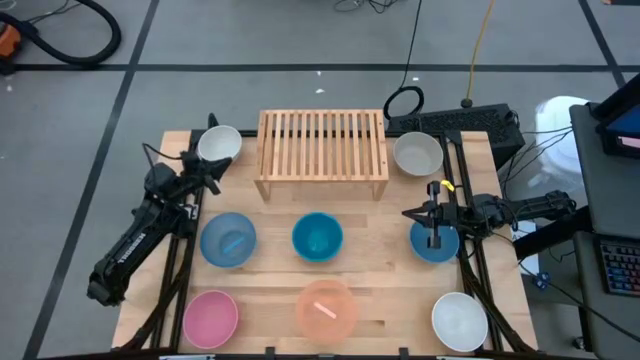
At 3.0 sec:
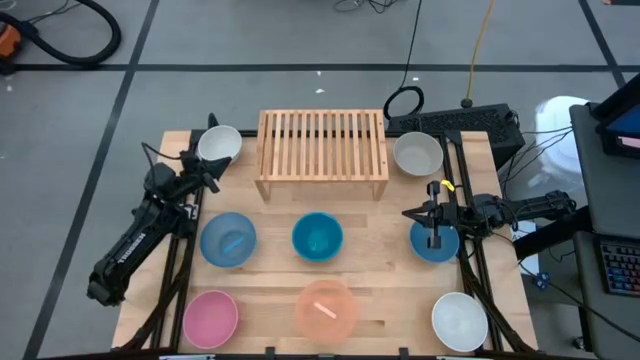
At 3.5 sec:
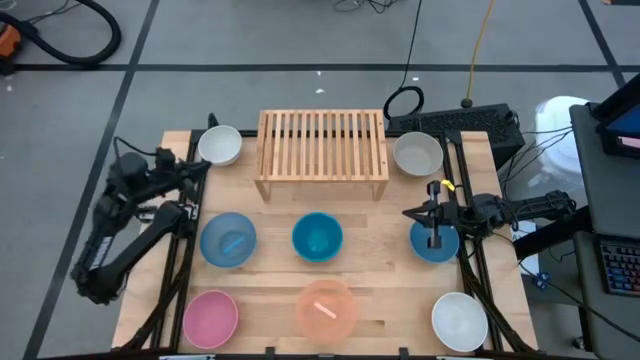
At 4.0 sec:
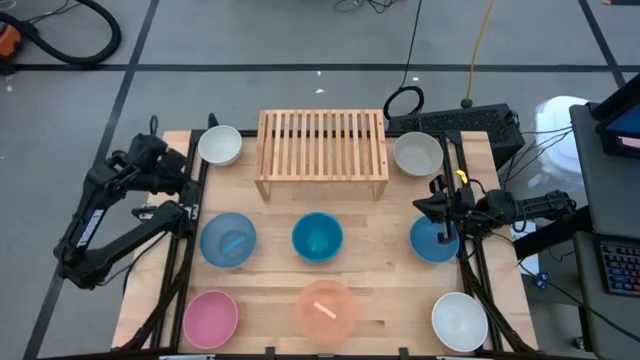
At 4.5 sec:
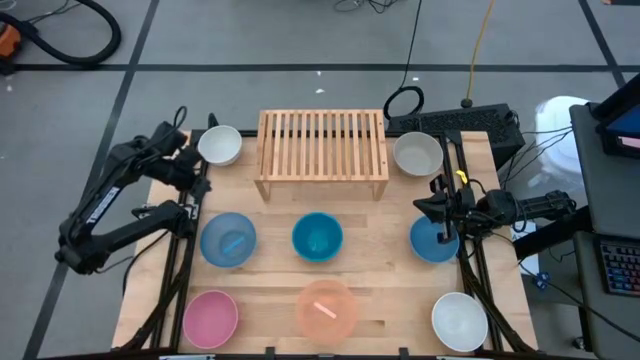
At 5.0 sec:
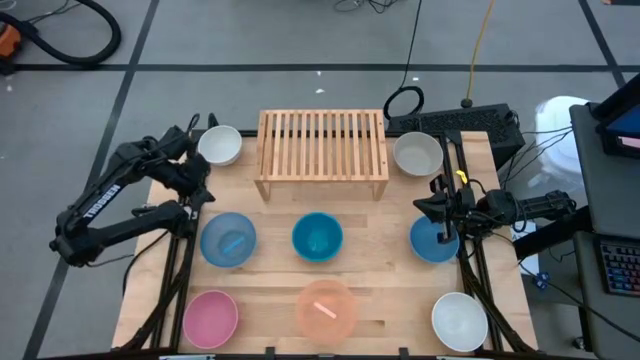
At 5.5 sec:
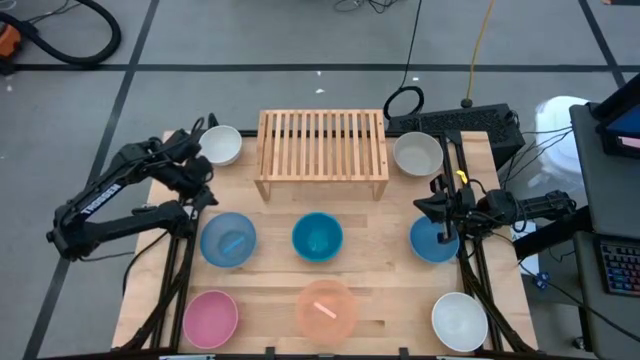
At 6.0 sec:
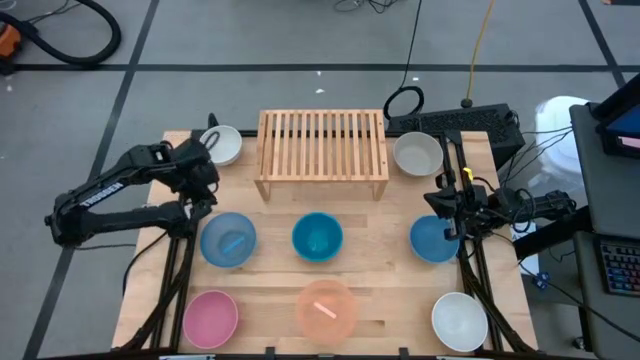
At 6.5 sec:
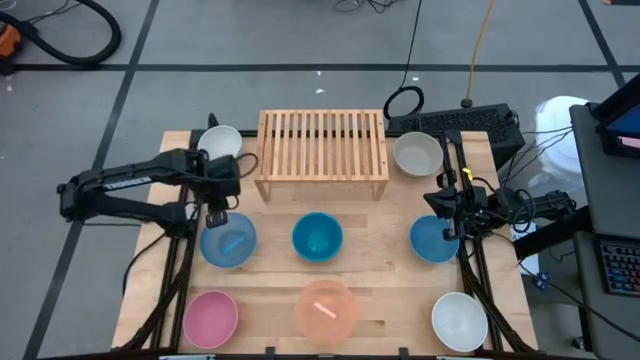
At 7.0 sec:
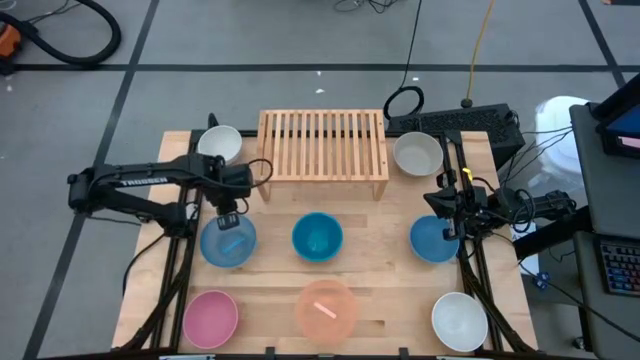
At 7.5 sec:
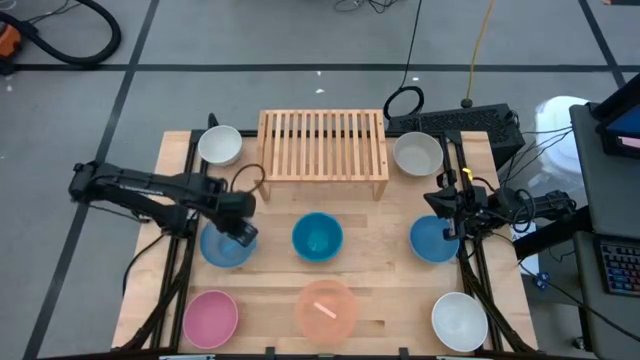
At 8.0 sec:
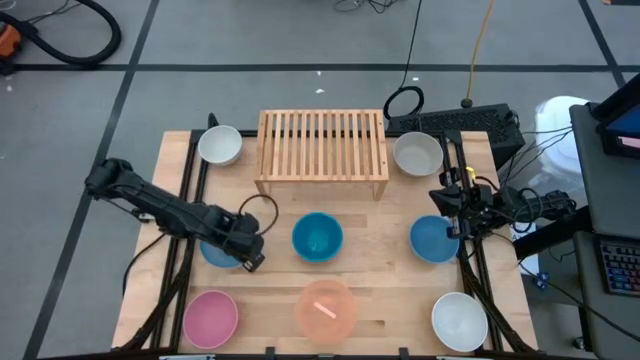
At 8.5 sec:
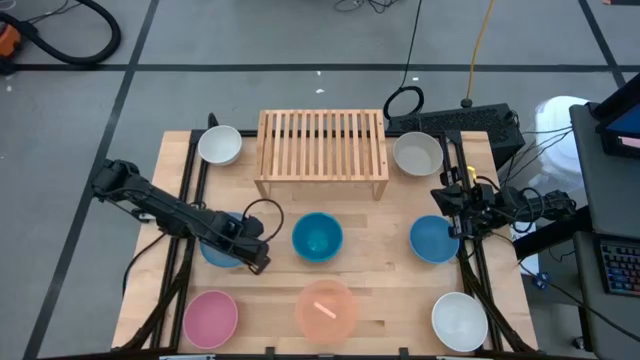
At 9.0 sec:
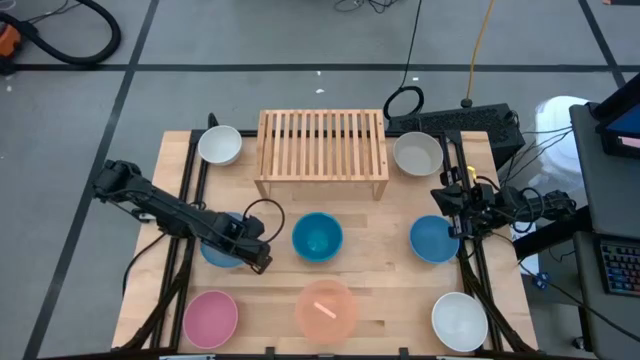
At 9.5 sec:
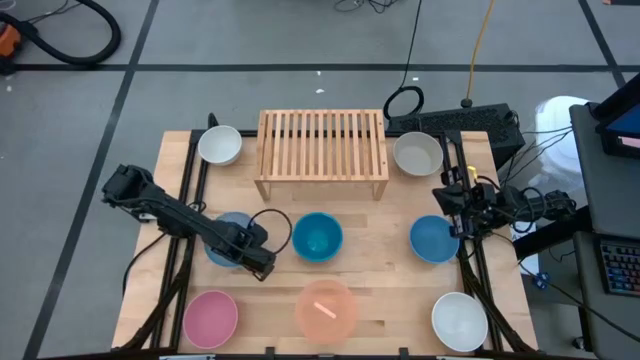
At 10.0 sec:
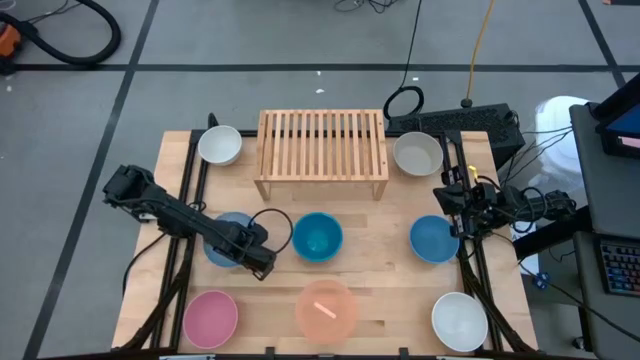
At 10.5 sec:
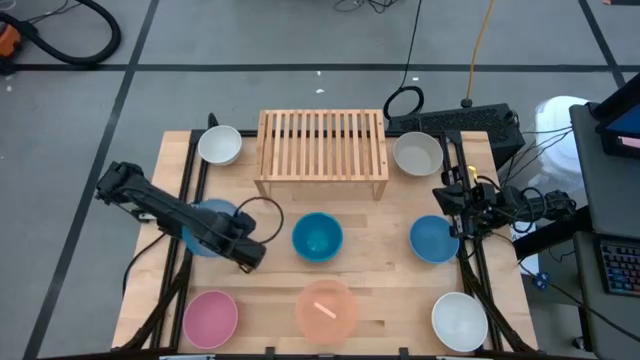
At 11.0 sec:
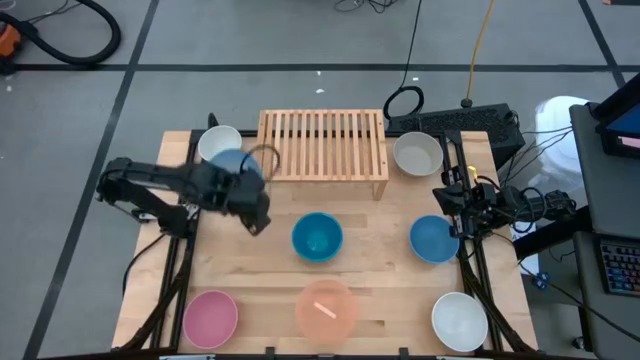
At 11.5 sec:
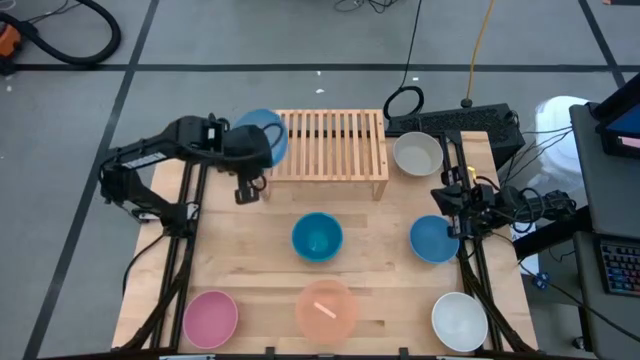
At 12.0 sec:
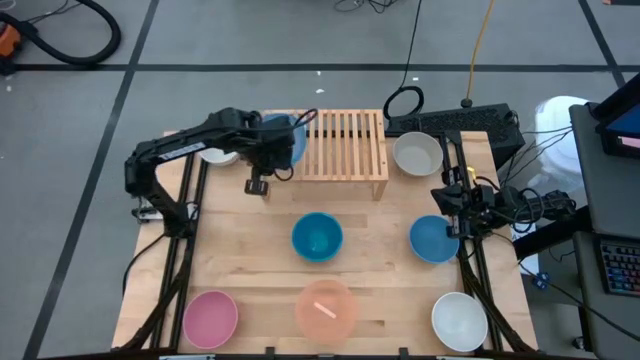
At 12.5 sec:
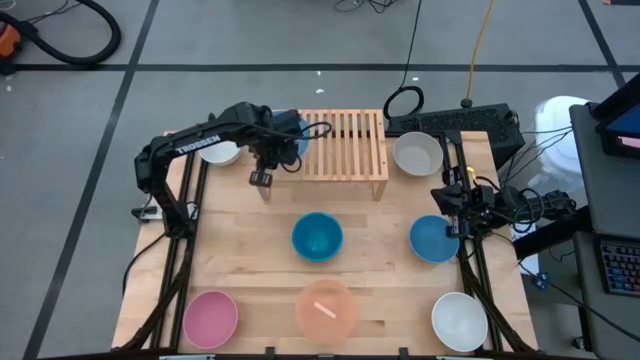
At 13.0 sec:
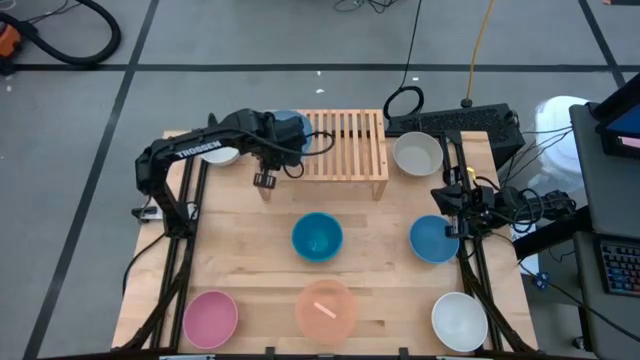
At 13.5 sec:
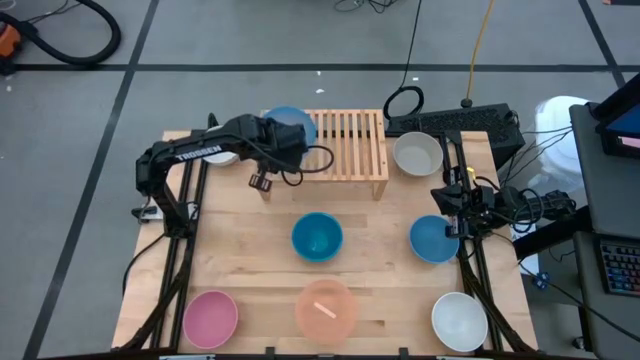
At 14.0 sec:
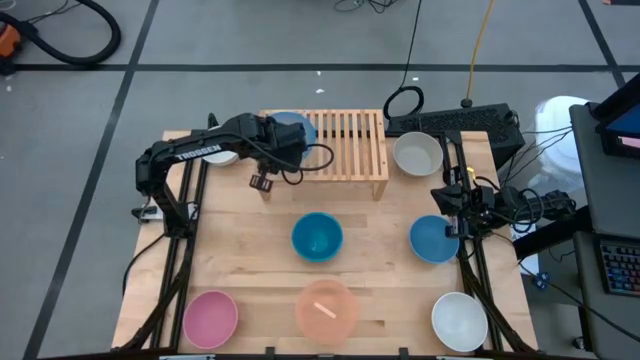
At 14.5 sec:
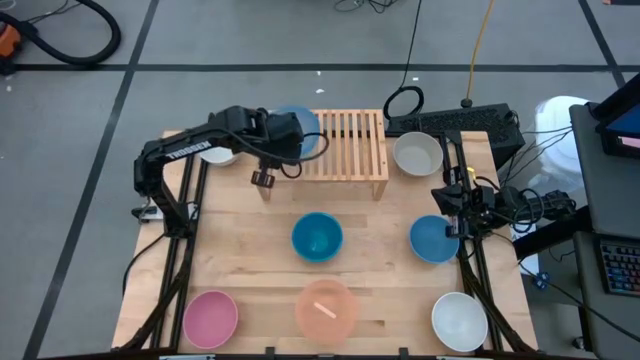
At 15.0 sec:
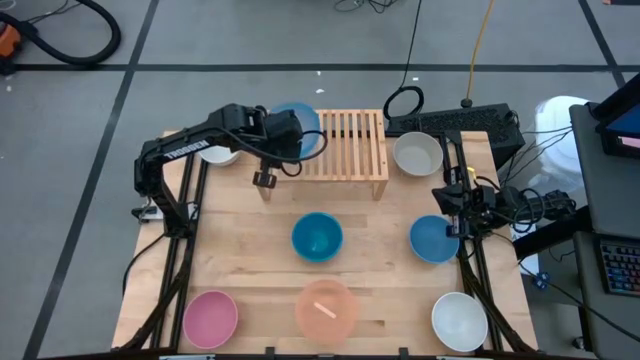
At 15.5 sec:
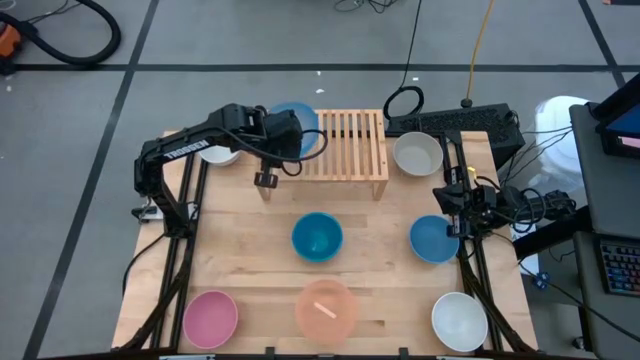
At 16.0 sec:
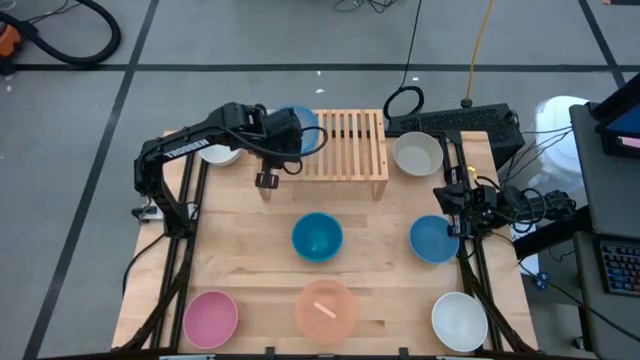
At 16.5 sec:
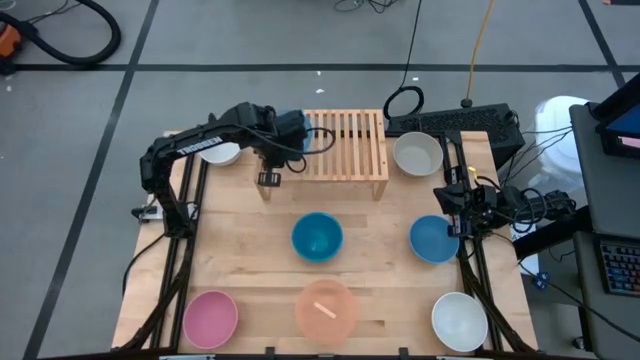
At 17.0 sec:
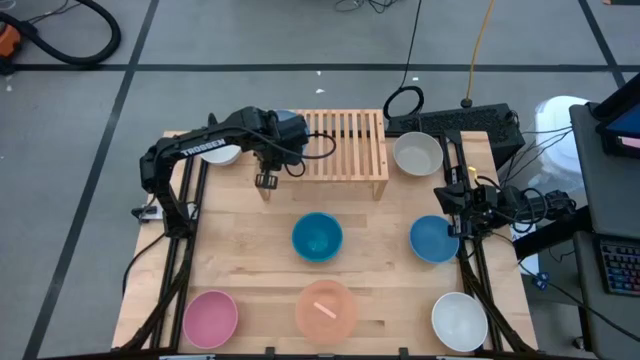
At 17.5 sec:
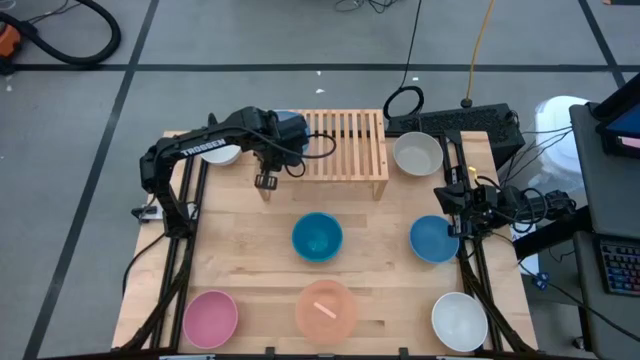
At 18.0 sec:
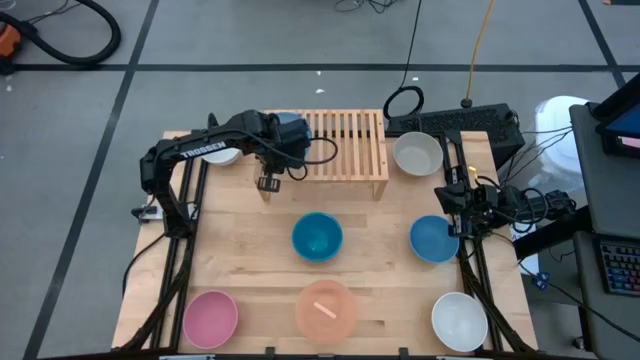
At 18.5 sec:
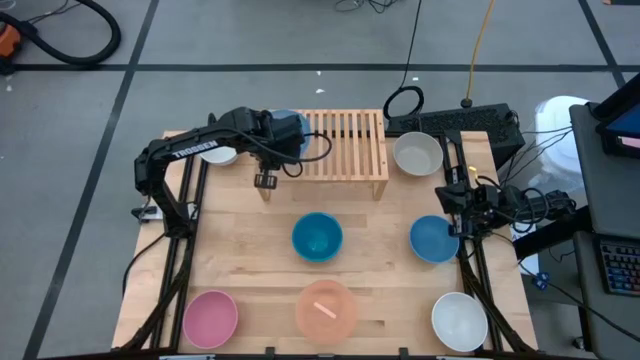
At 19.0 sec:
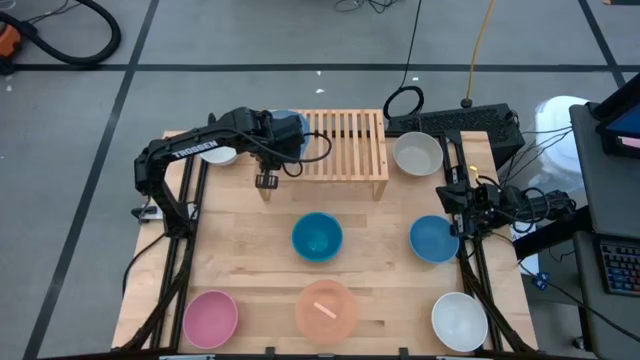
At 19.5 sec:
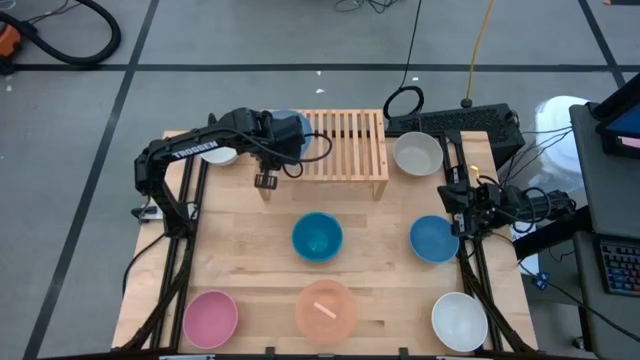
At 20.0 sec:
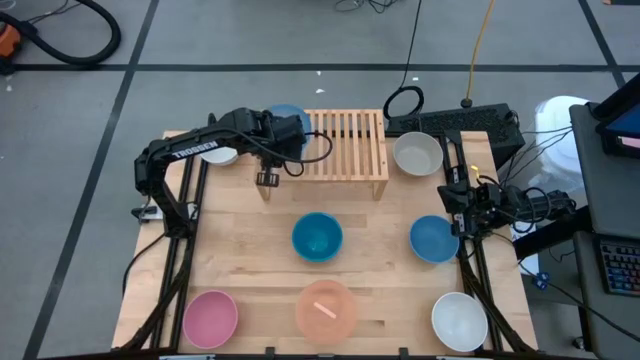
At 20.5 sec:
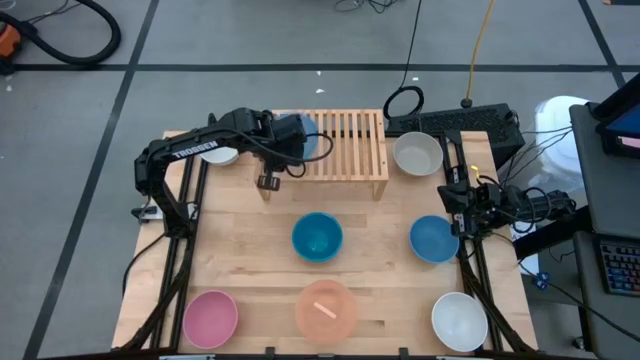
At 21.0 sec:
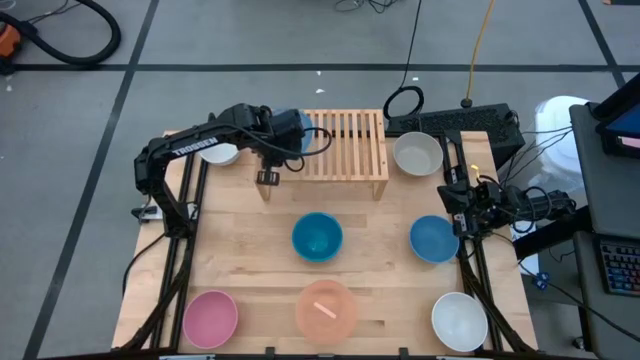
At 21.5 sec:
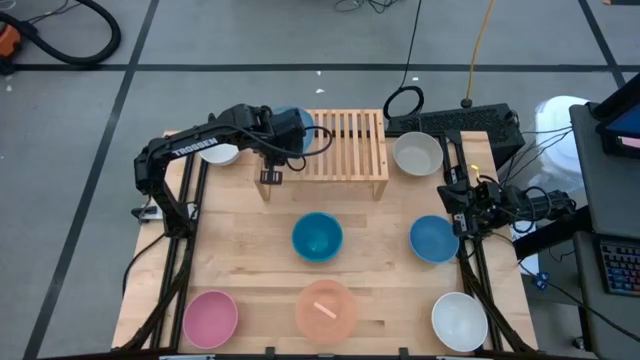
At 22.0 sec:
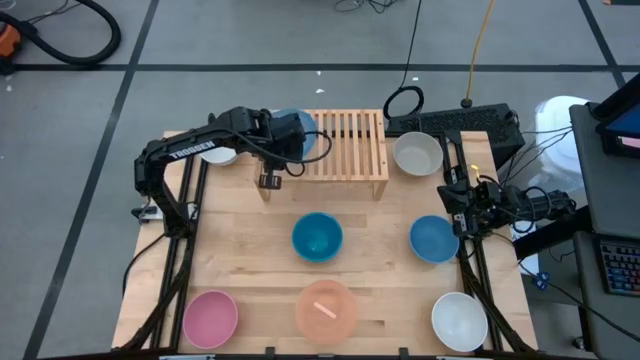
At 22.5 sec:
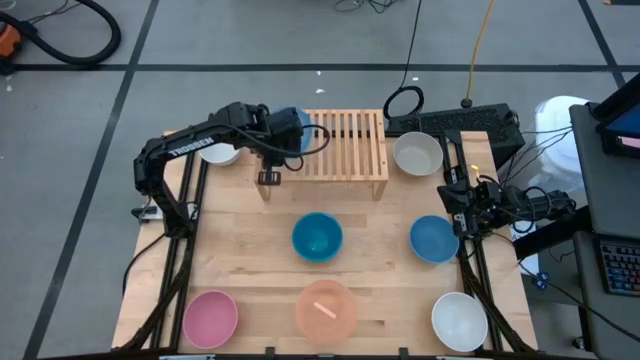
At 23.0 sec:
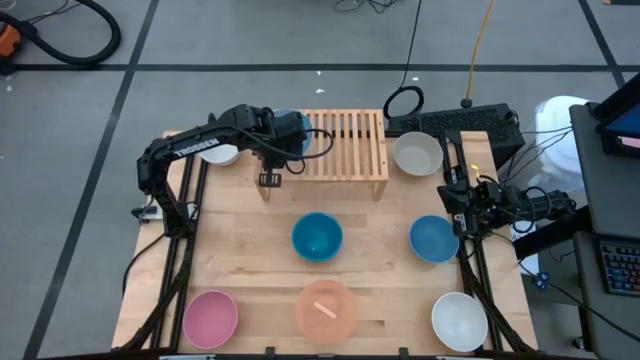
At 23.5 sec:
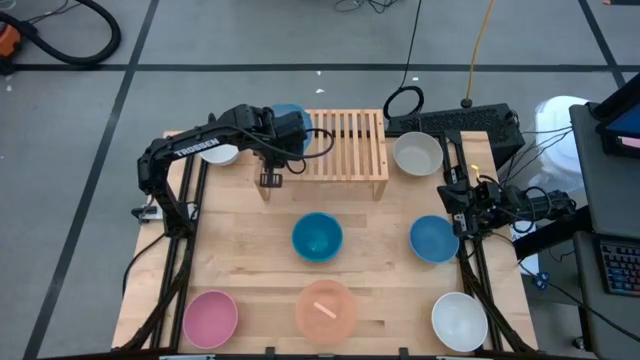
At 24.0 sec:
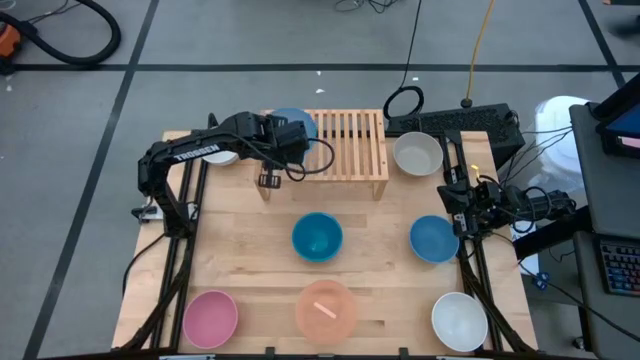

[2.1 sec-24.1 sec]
Task: Place and stack bowls onto a shelf
Put the light blue bowl on the shelf
